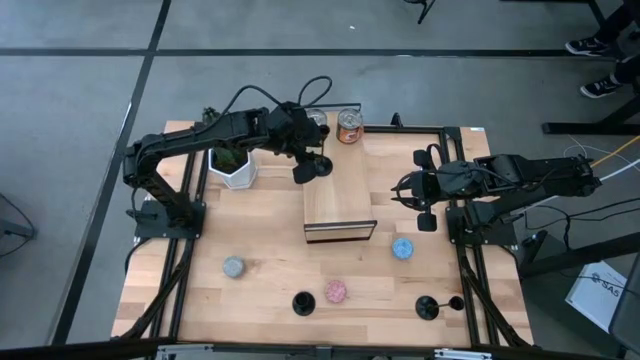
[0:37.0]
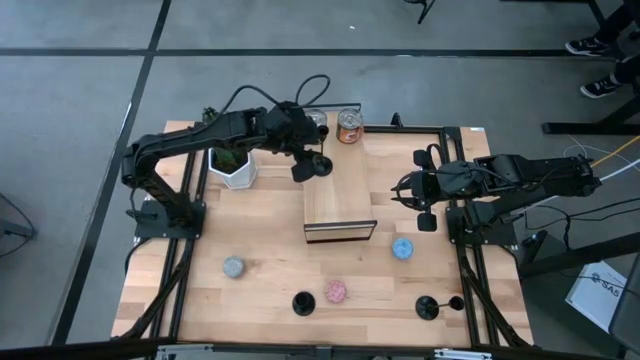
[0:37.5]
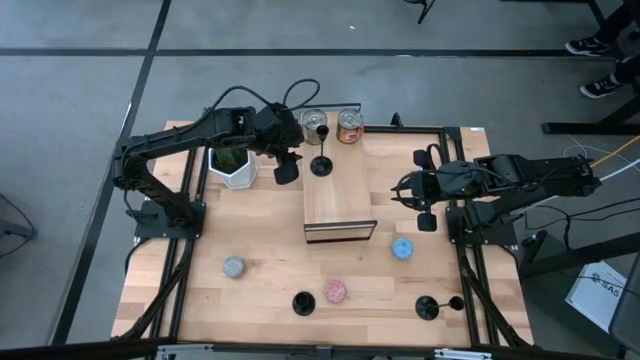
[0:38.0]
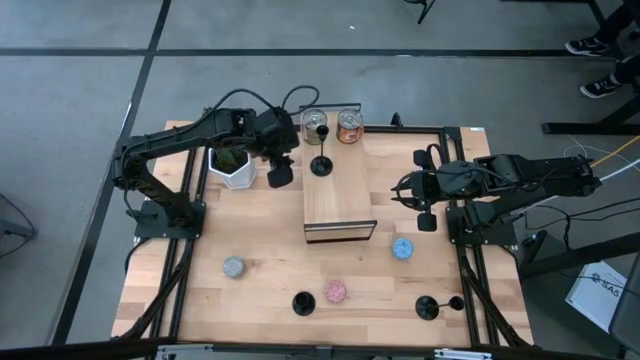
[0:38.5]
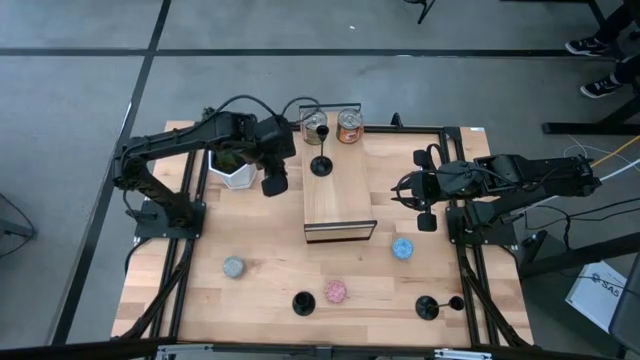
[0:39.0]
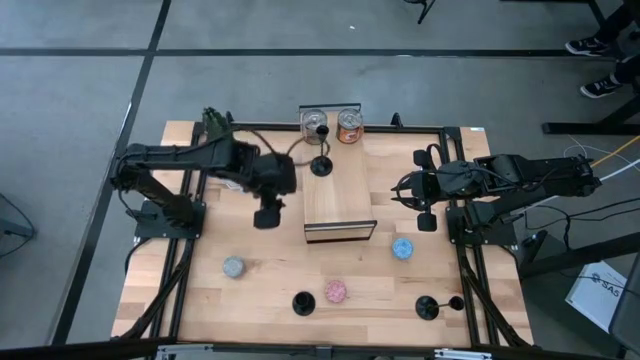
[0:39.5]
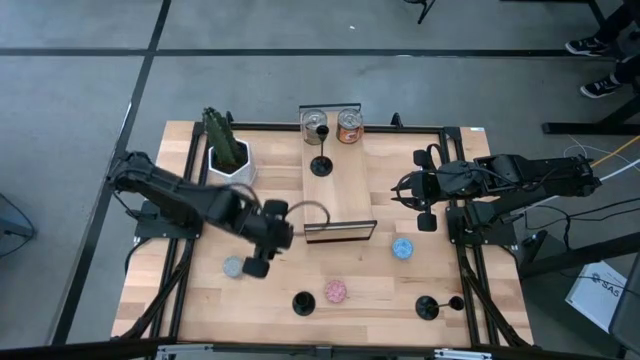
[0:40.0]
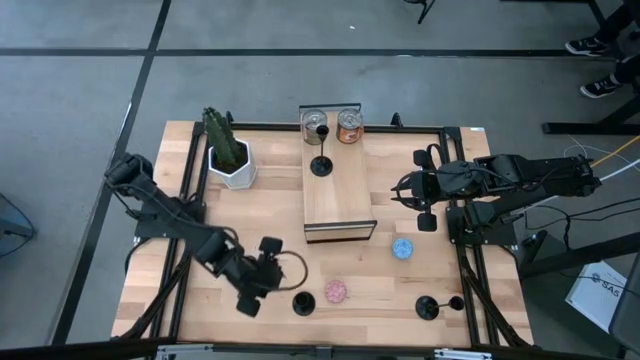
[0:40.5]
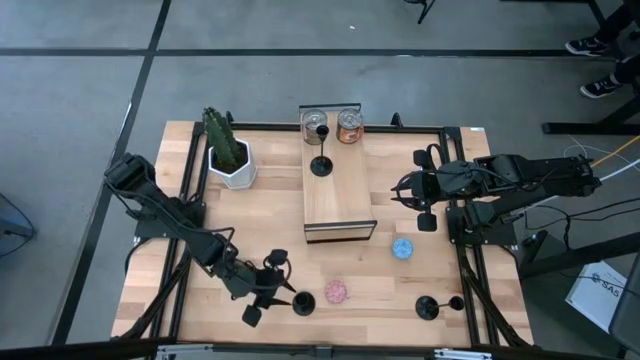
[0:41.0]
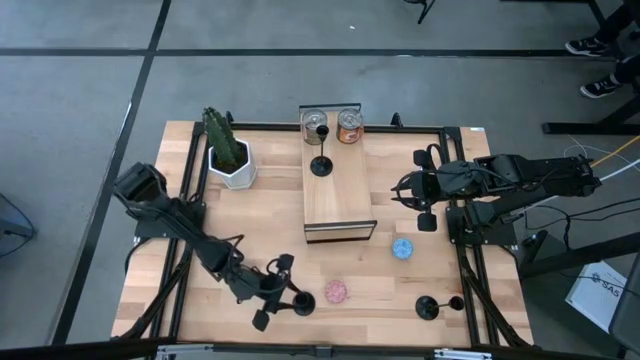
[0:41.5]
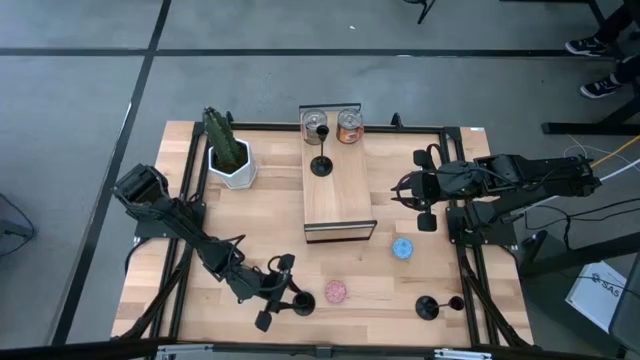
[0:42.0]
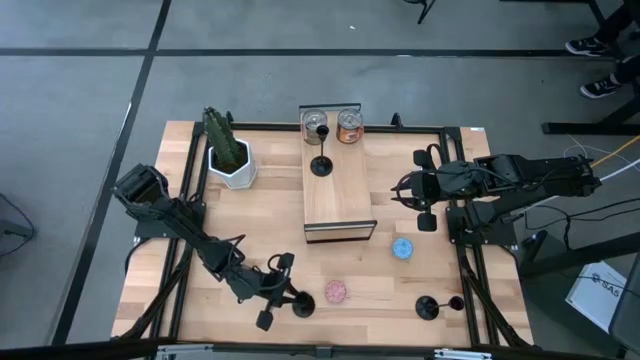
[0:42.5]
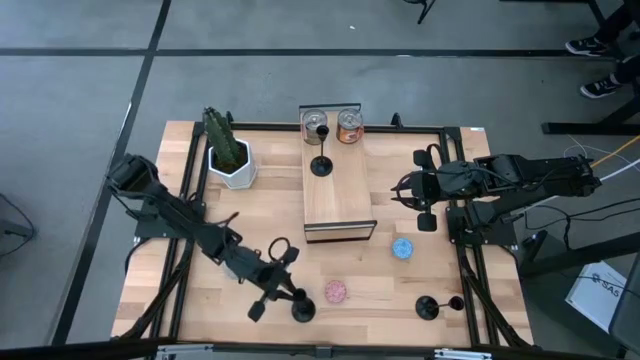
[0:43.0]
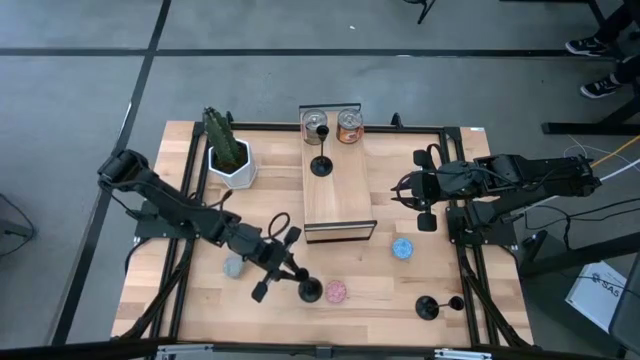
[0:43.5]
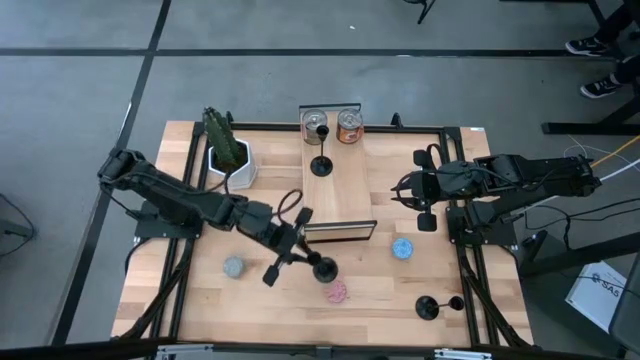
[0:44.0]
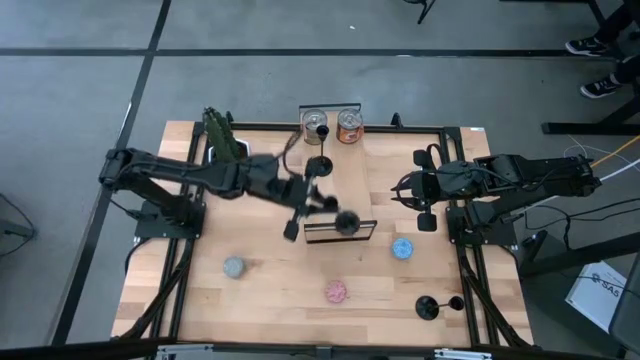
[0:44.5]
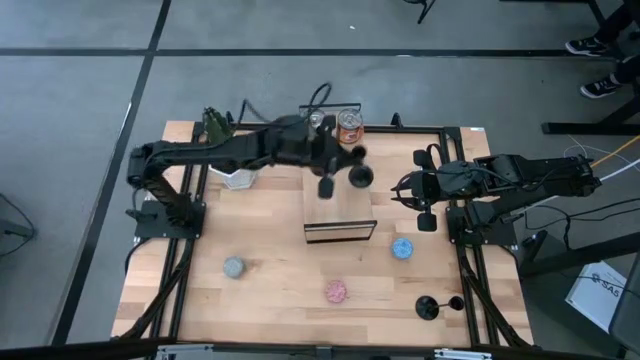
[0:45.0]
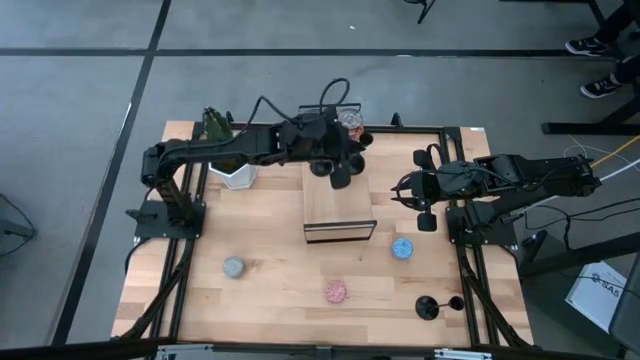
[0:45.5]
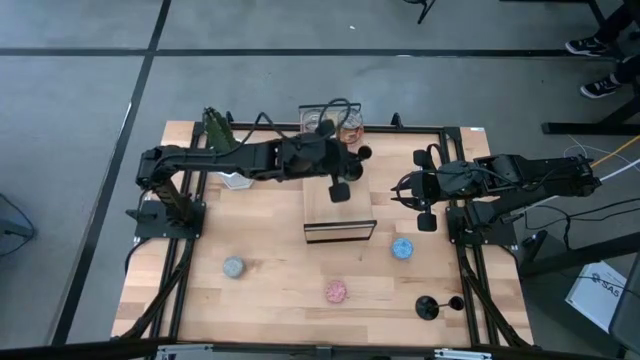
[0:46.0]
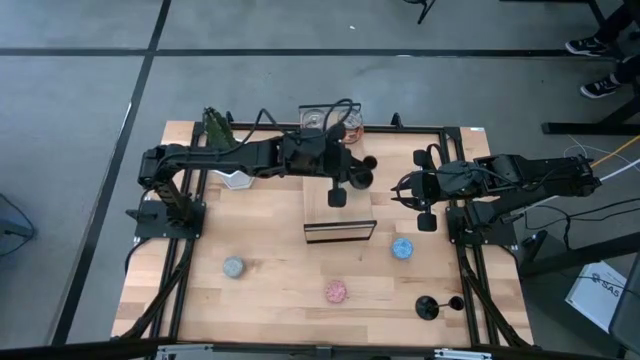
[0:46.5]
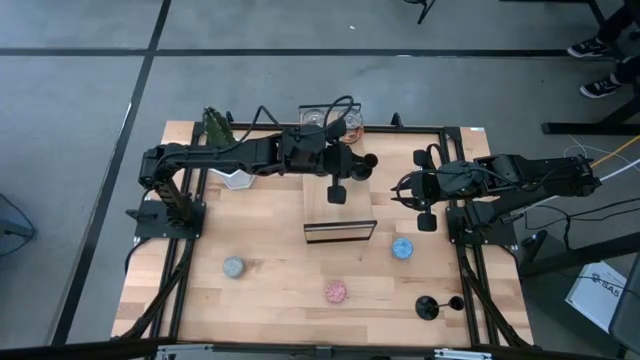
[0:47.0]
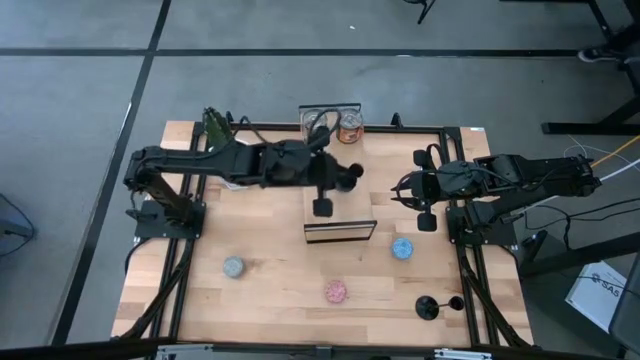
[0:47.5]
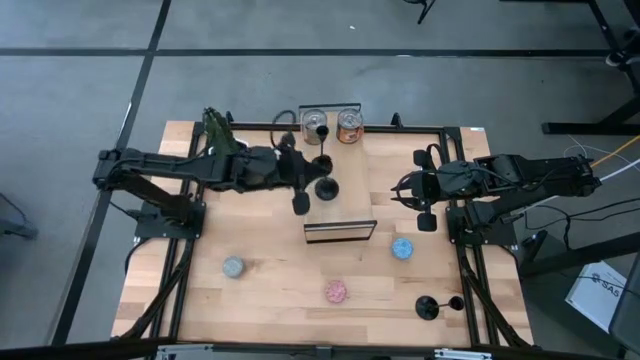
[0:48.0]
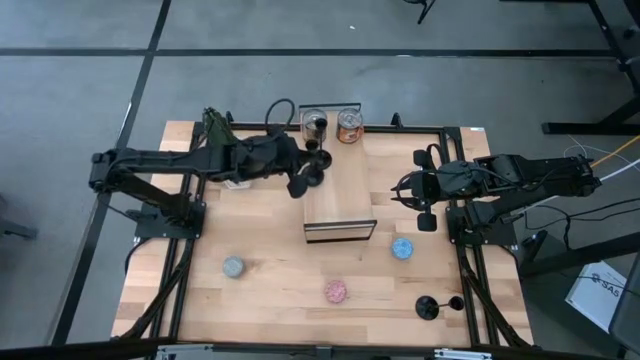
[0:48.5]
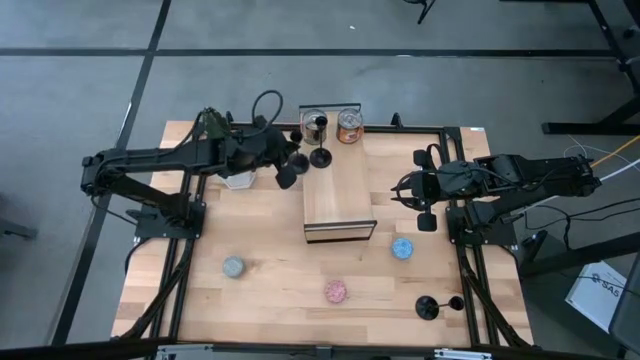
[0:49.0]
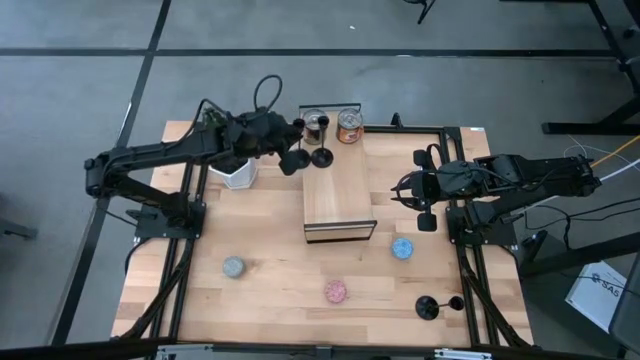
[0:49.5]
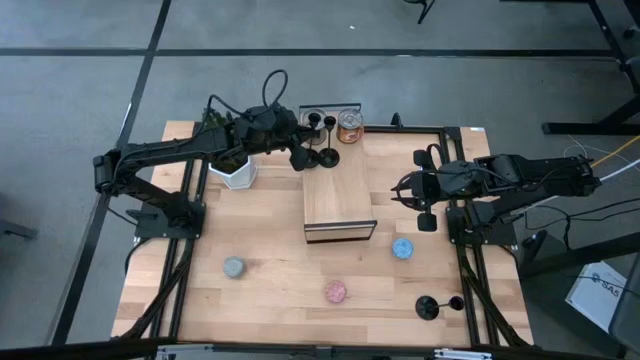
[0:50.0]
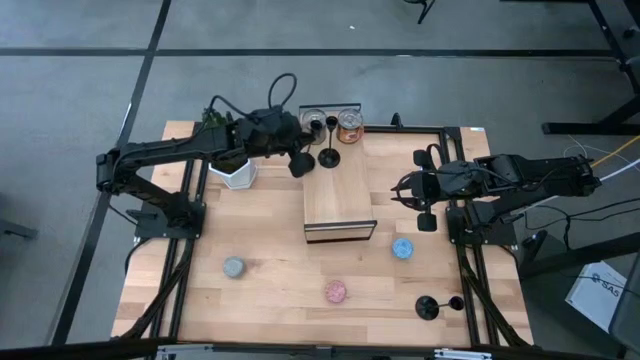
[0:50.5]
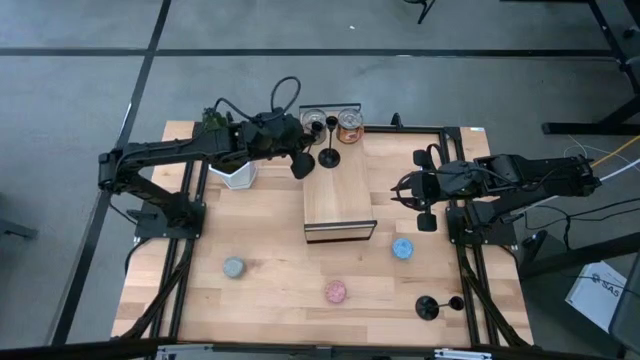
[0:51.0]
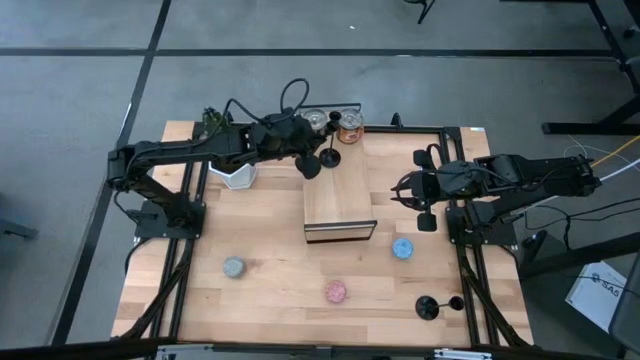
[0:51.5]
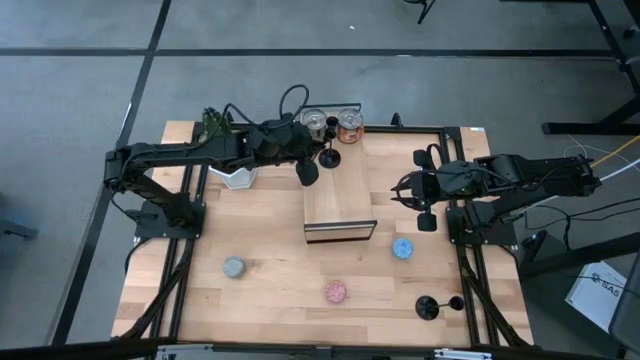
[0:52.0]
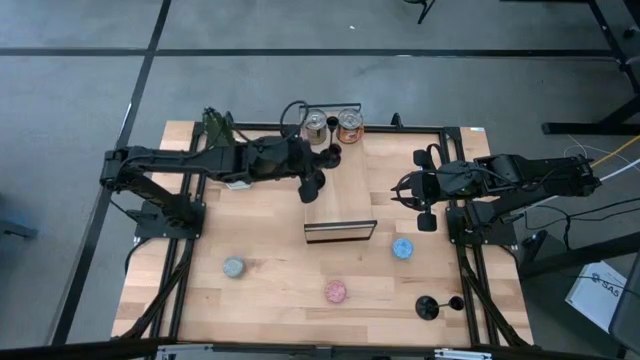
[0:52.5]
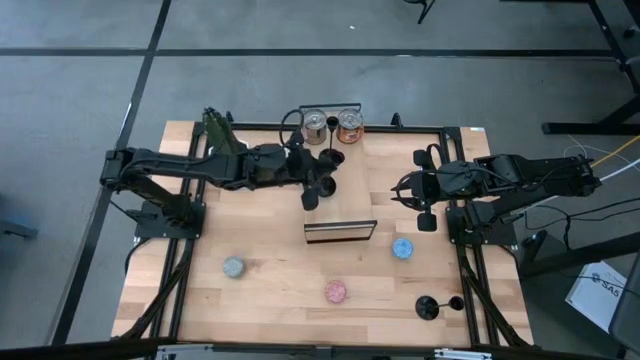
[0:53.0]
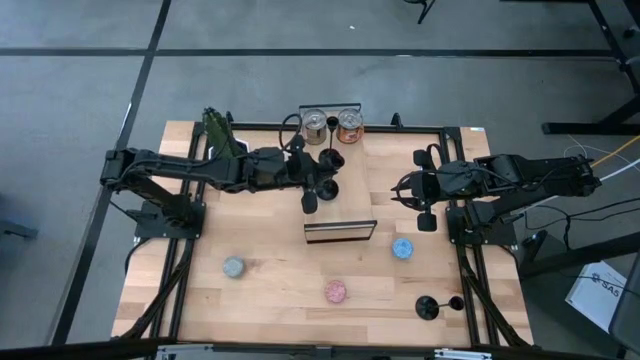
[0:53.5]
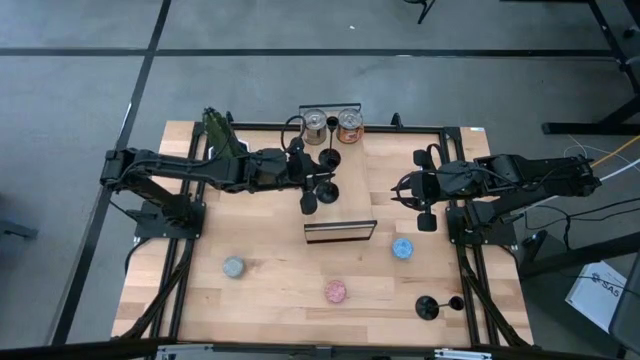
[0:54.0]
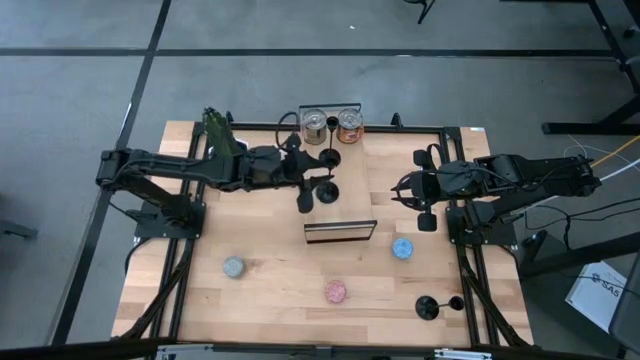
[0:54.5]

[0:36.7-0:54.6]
Task: Pick & Place candle stick holders
Put the left candle holder on the shelf
